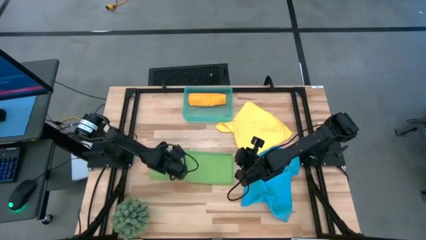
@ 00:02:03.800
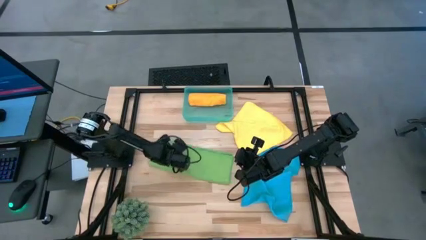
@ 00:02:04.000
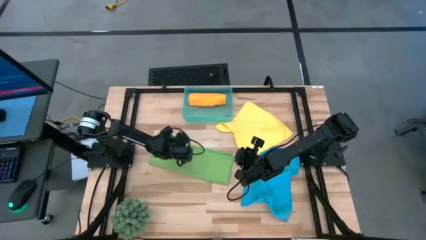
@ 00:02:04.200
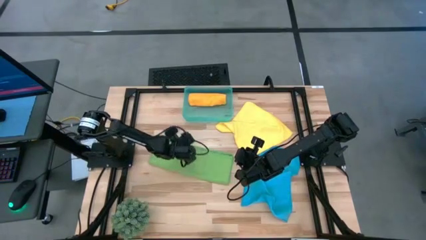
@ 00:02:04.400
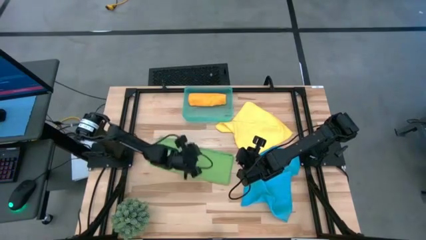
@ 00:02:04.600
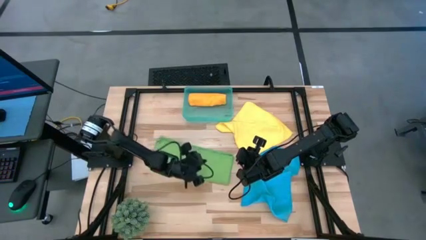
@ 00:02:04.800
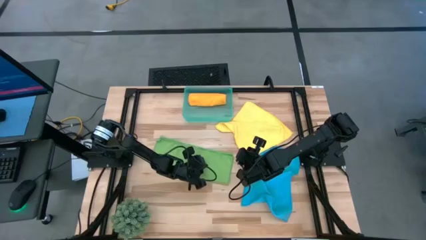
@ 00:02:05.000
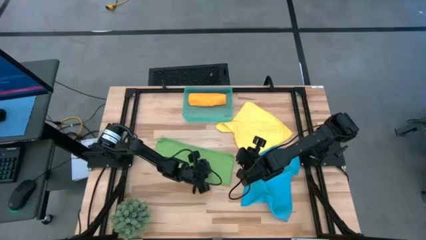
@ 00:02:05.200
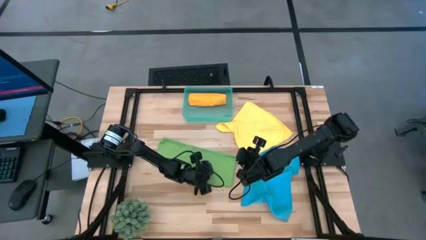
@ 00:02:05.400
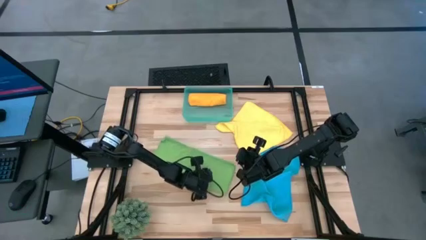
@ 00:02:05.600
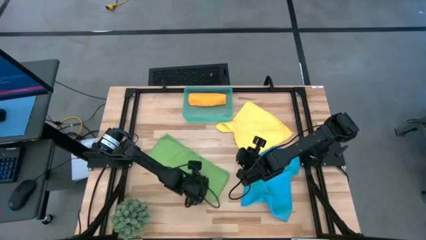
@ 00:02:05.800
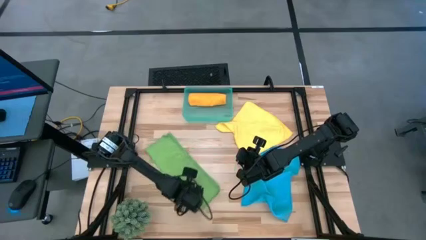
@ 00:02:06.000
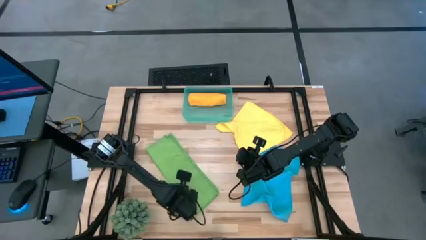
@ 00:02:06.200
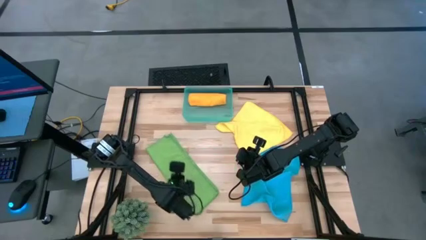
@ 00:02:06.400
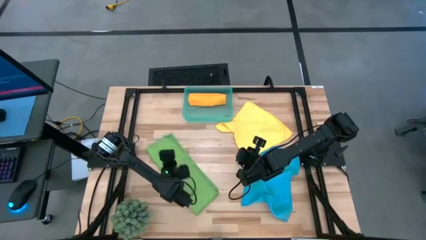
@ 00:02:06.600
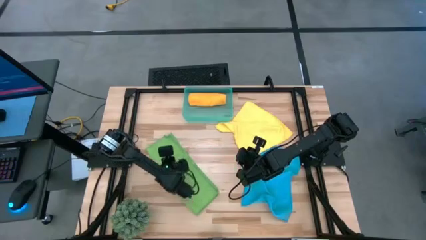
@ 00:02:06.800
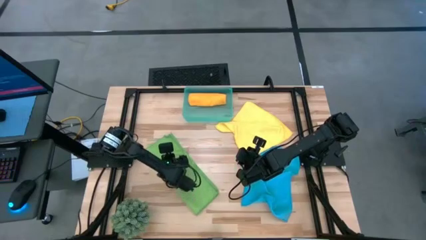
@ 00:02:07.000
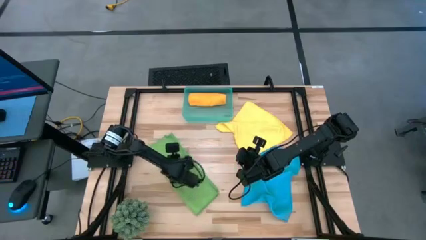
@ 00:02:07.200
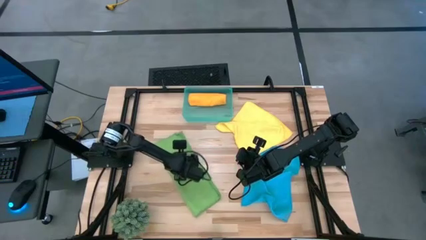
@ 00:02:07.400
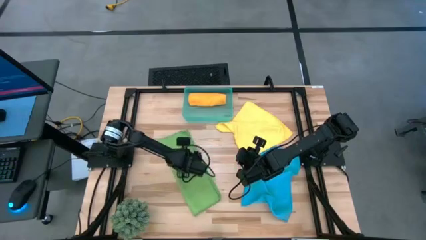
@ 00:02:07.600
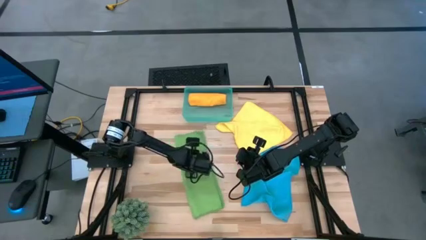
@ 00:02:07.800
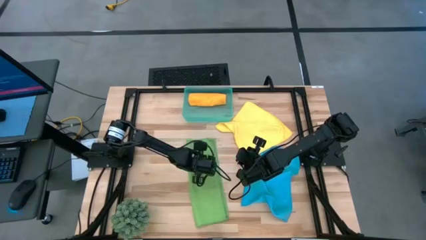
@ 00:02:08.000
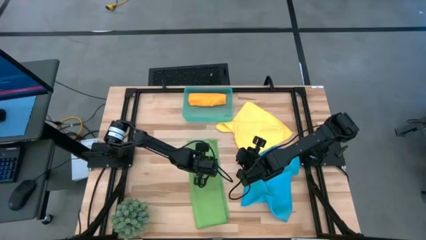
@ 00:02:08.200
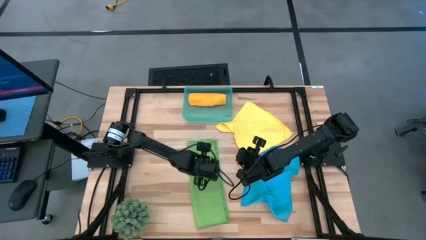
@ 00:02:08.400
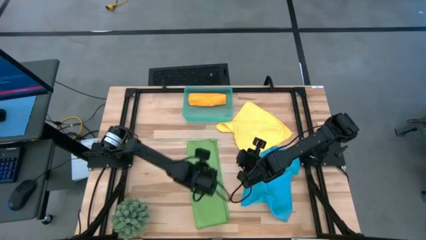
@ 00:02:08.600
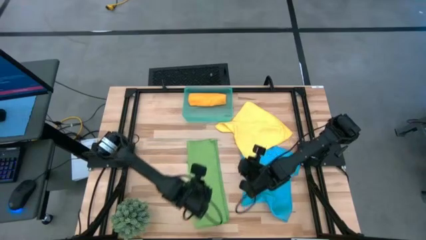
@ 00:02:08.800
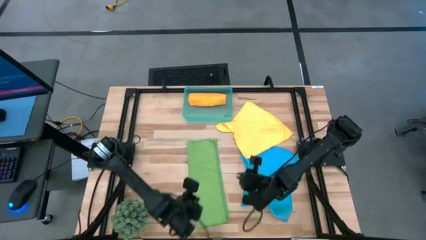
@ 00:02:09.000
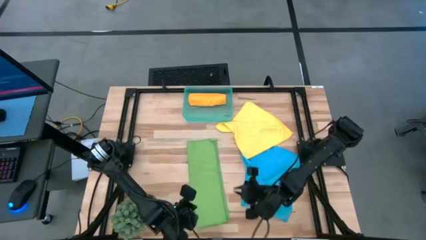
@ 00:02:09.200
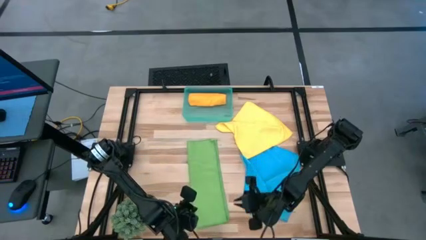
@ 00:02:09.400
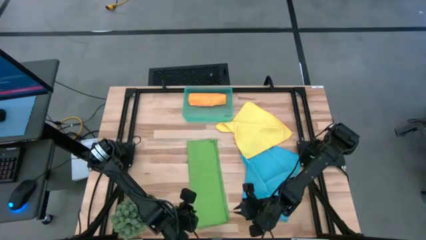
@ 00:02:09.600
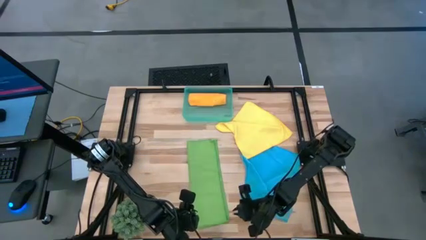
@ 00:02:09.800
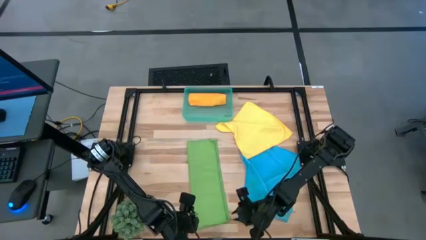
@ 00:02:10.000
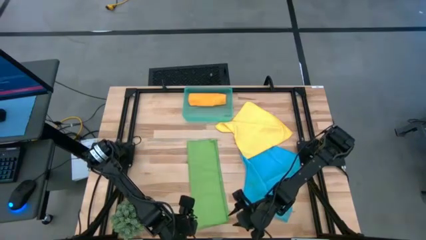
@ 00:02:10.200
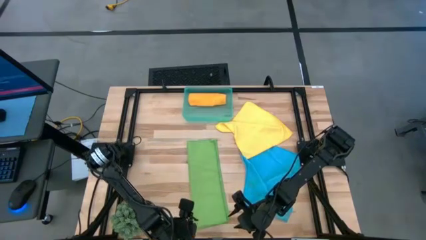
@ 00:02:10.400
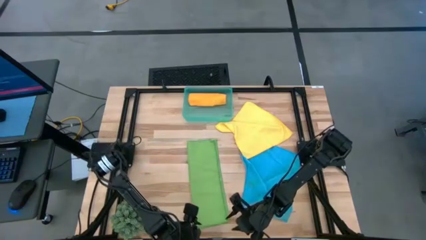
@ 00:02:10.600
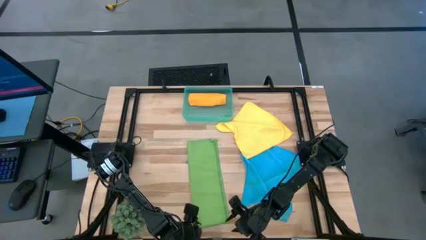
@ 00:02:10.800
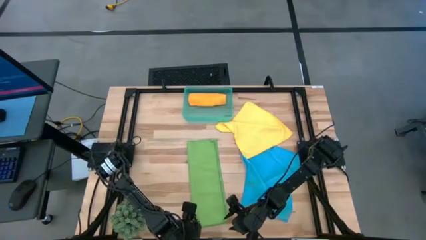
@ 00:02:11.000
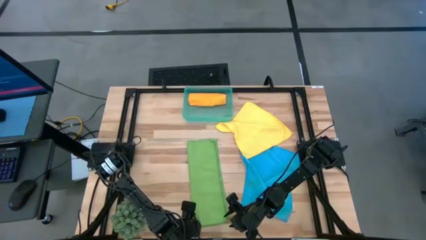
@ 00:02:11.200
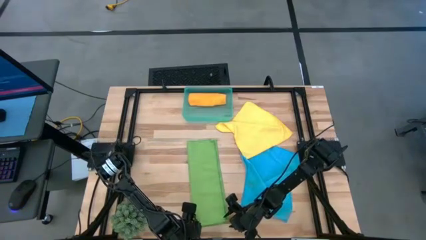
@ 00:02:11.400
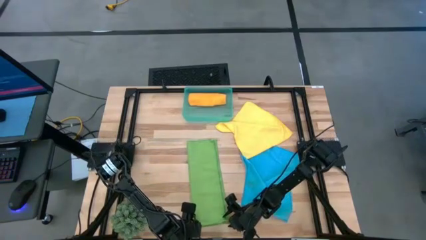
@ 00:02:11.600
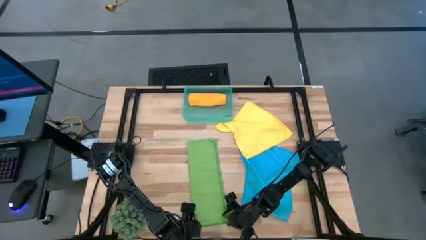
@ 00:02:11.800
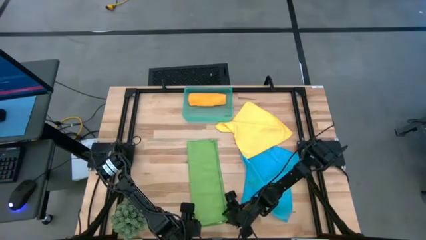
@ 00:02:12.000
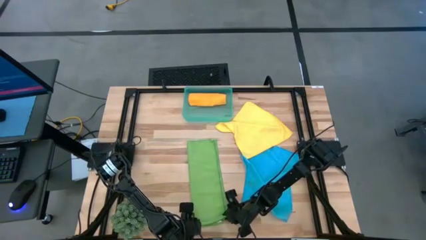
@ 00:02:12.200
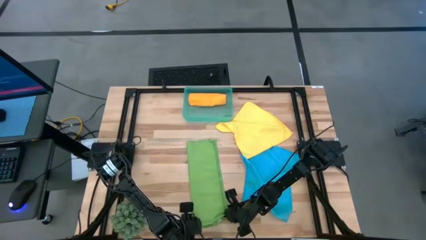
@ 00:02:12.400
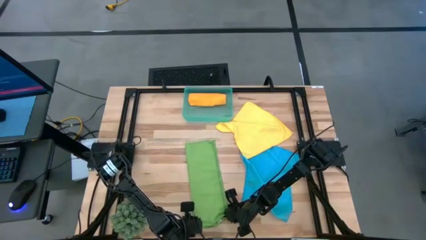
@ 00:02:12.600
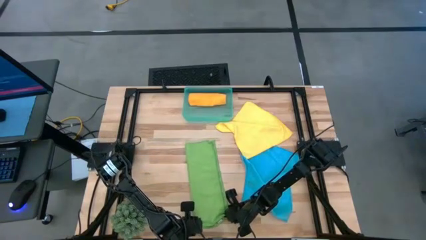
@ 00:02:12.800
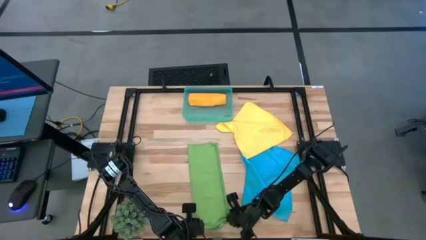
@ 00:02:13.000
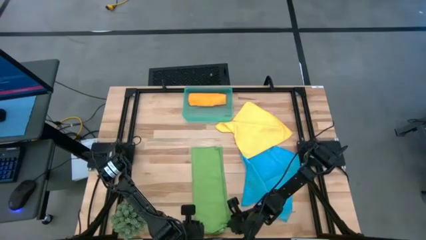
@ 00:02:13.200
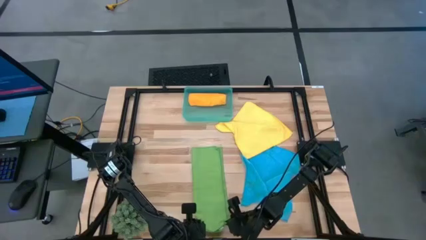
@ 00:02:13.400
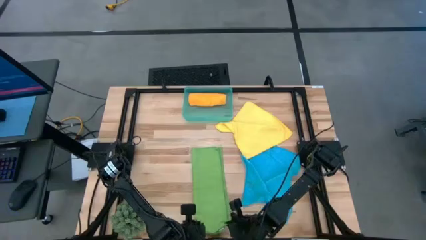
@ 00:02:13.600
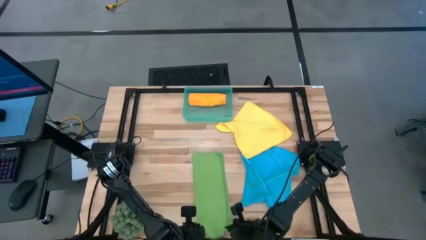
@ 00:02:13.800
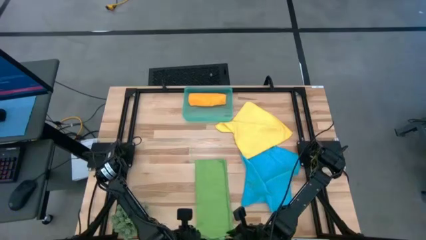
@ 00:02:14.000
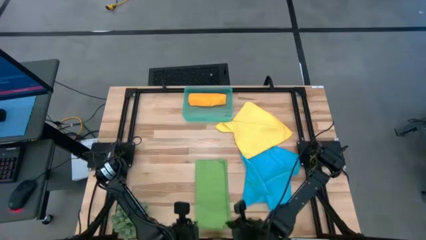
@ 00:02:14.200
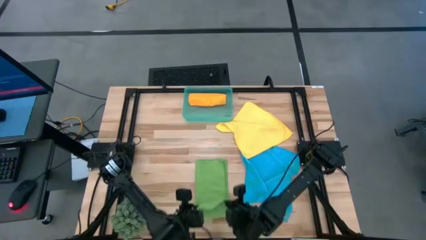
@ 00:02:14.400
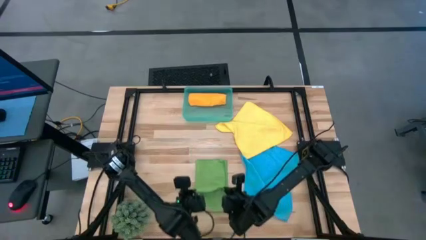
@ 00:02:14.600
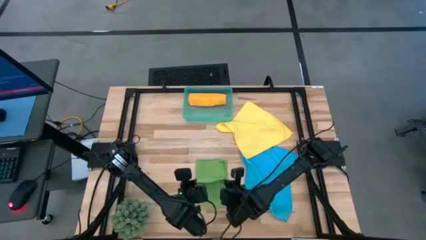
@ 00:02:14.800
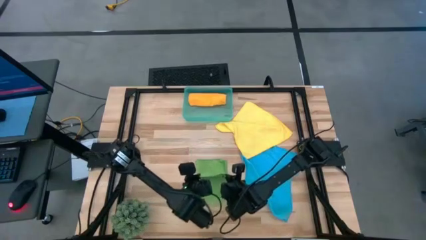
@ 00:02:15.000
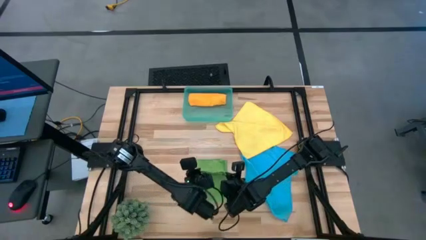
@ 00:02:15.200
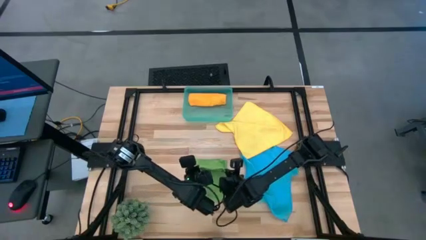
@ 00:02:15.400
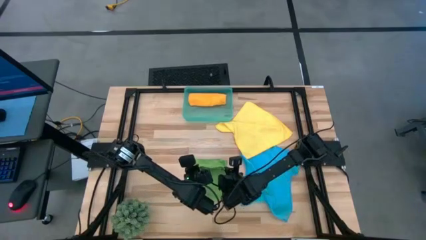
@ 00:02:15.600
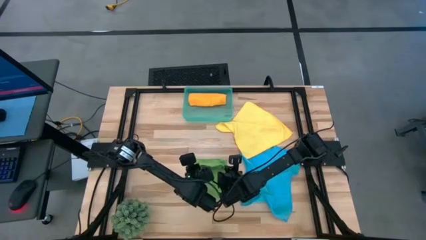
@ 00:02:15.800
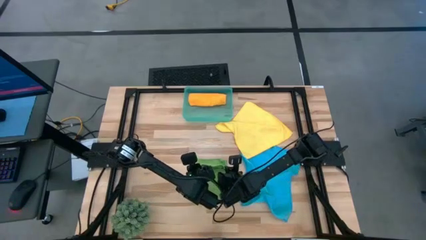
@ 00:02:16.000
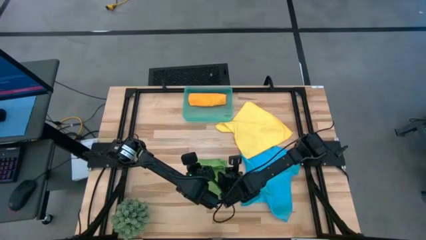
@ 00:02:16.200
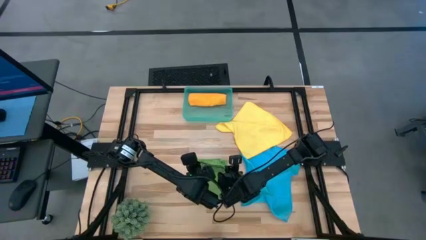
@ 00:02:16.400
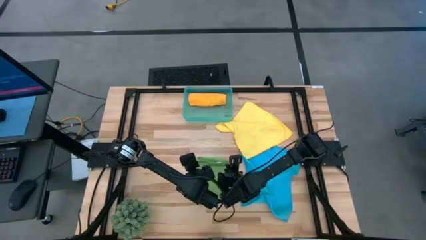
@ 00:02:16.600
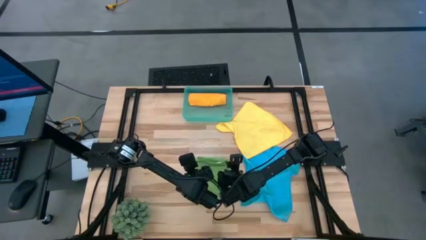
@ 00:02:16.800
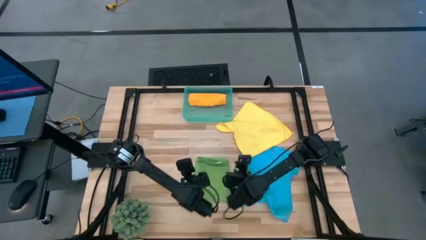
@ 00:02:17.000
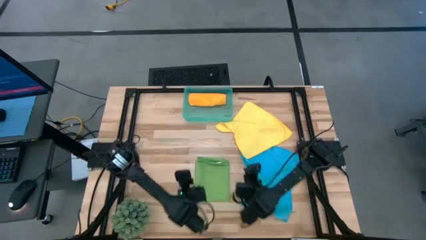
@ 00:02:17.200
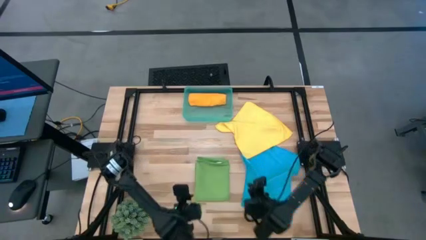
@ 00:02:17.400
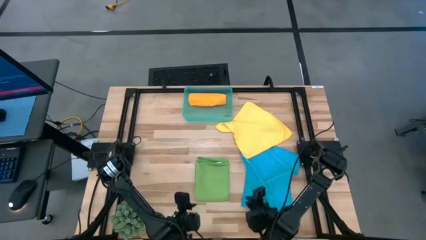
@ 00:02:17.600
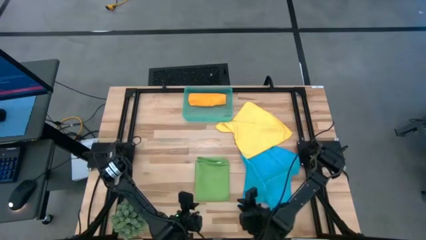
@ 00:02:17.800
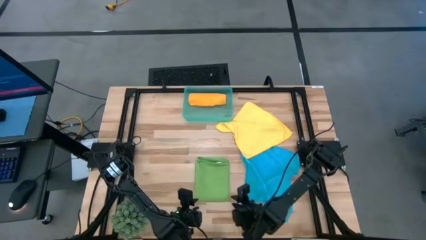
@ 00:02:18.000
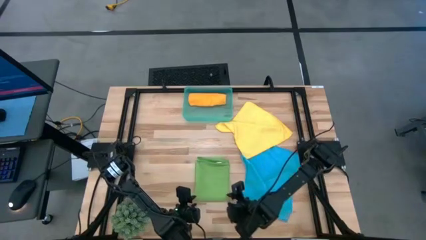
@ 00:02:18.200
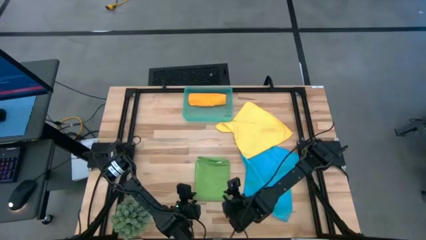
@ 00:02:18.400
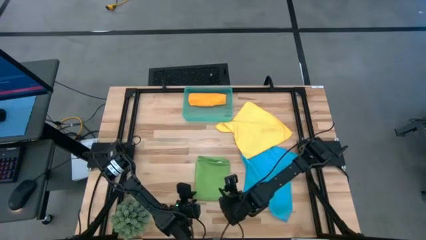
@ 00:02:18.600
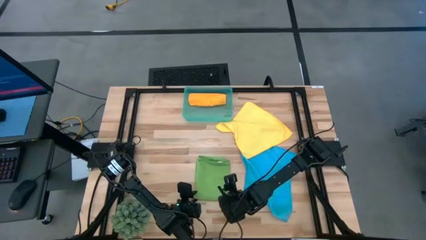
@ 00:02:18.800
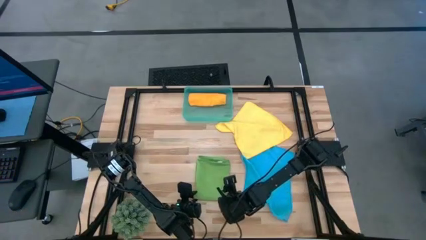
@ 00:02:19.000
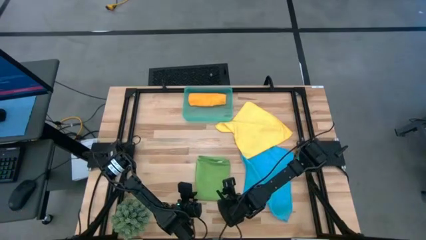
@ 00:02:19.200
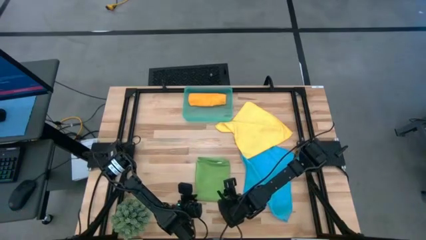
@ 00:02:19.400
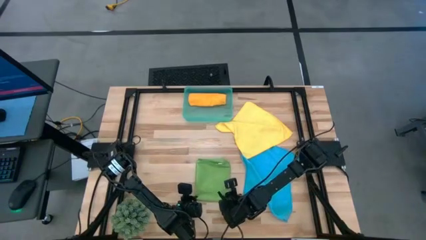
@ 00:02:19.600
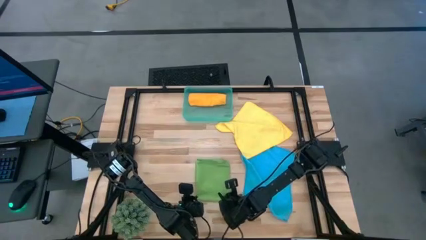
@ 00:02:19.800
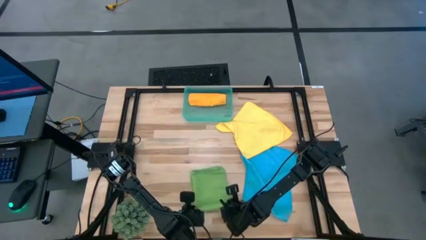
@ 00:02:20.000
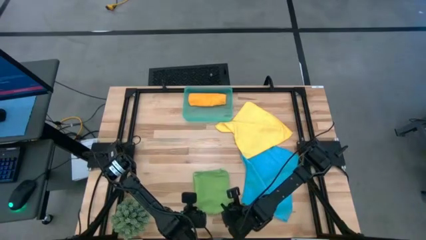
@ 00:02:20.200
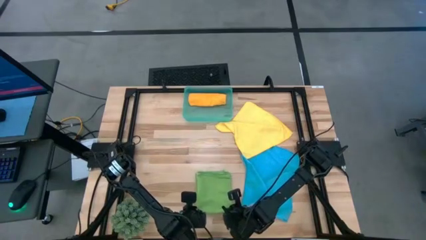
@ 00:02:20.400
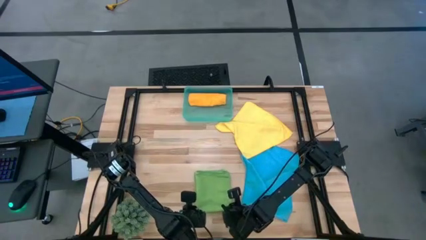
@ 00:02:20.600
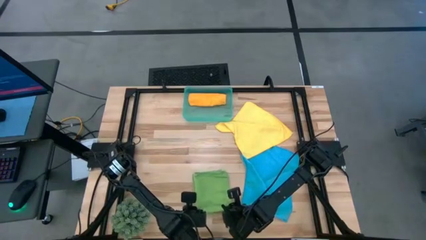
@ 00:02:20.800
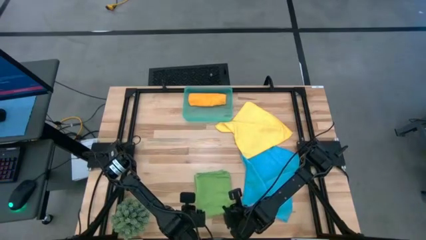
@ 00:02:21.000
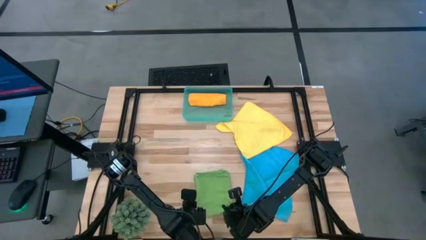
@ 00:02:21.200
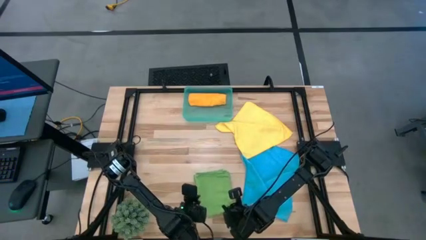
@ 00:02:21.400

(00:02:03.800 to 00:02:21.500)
Task: Roll microfiber towels into tight, uniform cylinder then place into a basket
Fold the green towel
